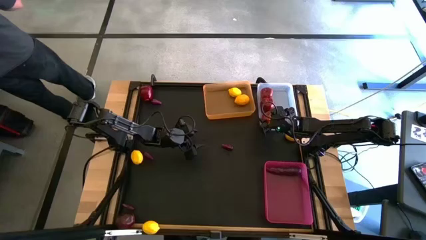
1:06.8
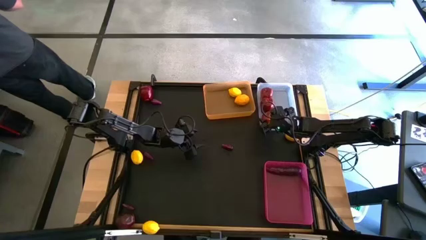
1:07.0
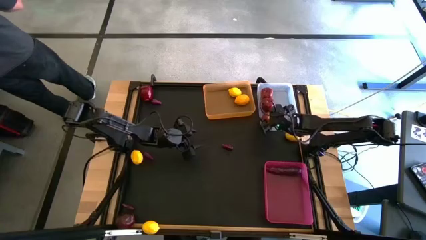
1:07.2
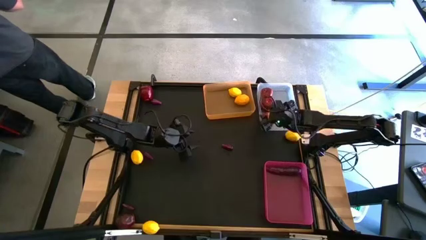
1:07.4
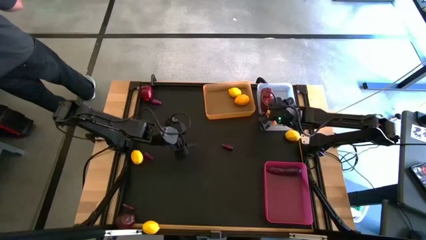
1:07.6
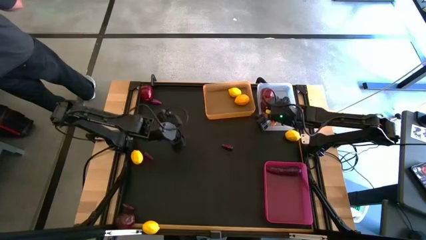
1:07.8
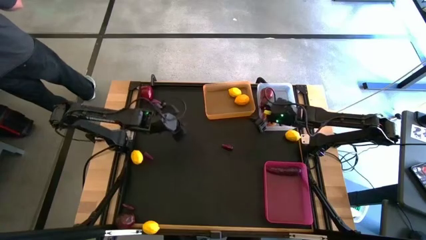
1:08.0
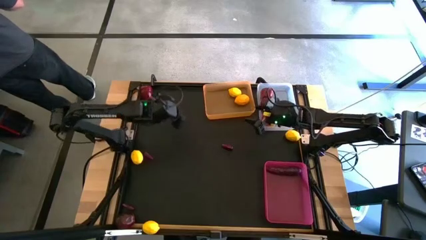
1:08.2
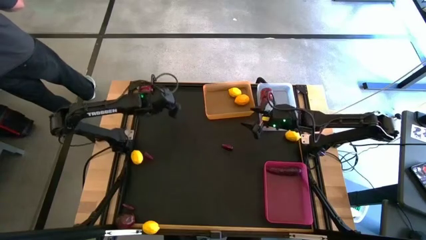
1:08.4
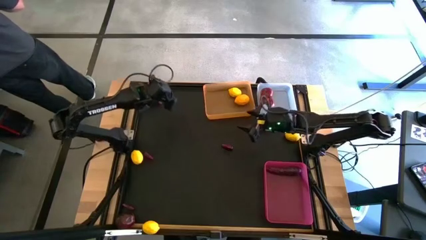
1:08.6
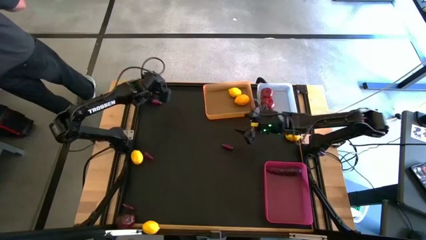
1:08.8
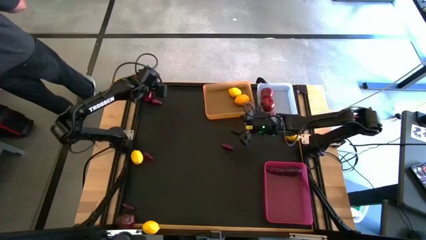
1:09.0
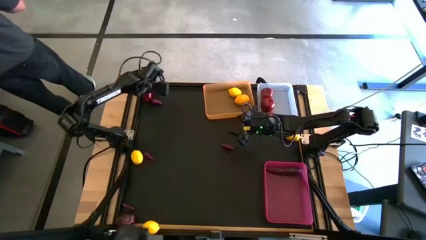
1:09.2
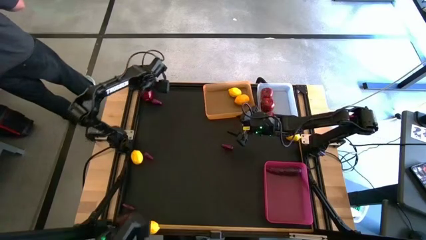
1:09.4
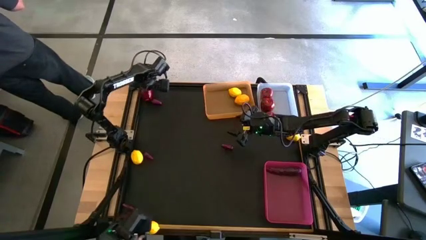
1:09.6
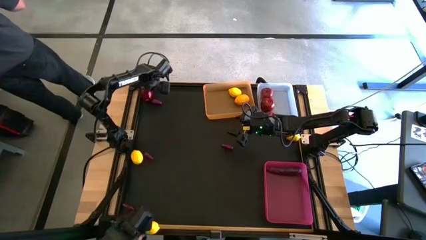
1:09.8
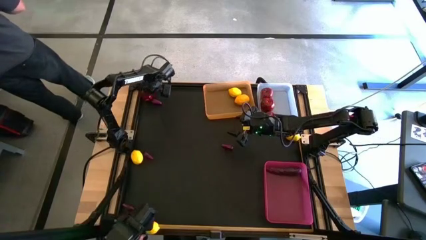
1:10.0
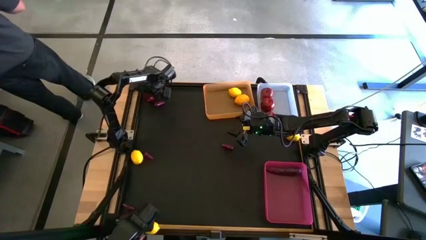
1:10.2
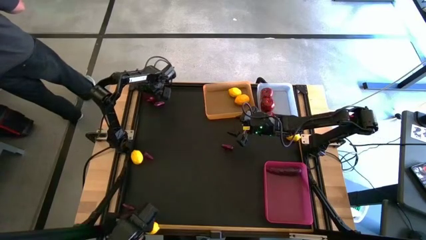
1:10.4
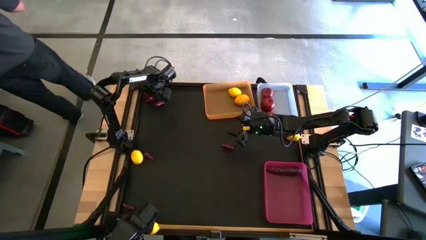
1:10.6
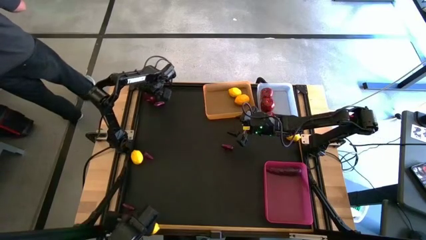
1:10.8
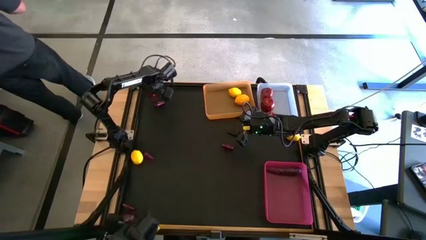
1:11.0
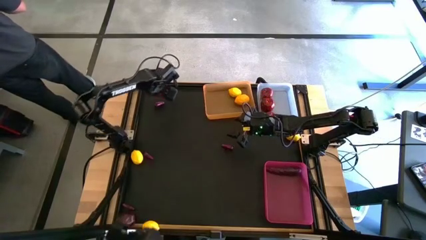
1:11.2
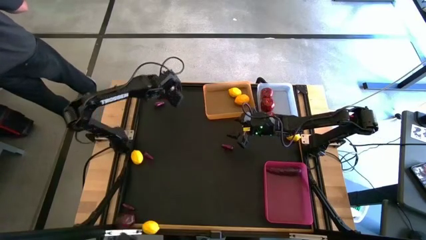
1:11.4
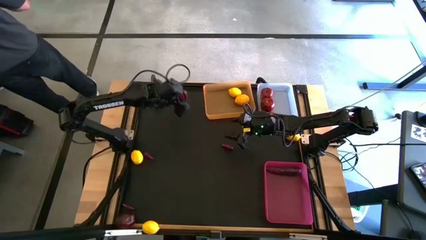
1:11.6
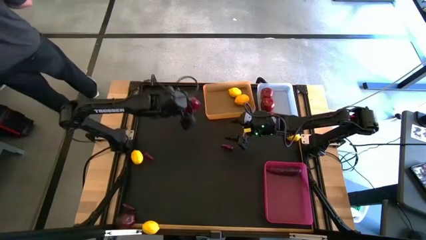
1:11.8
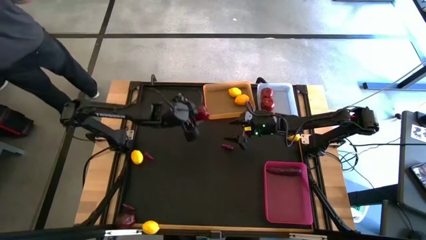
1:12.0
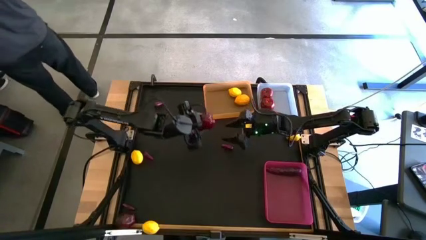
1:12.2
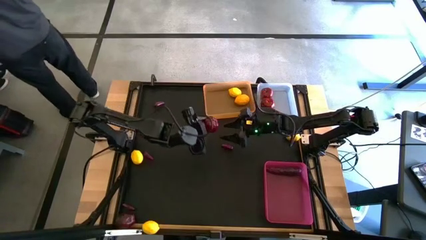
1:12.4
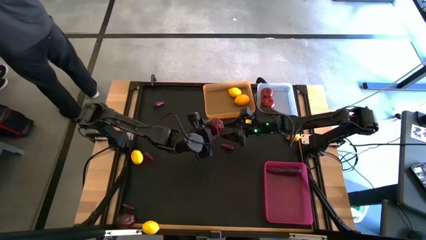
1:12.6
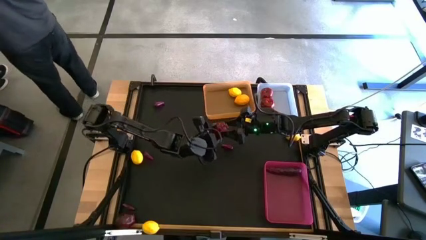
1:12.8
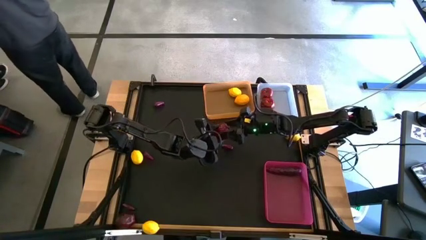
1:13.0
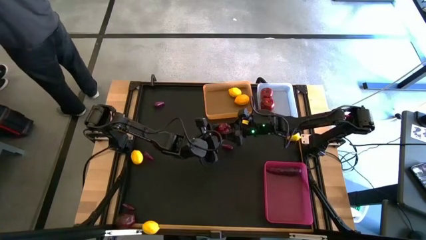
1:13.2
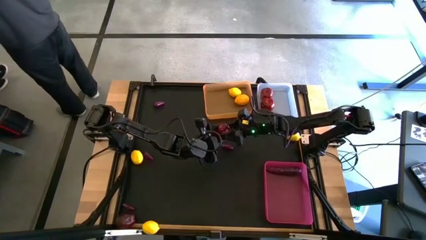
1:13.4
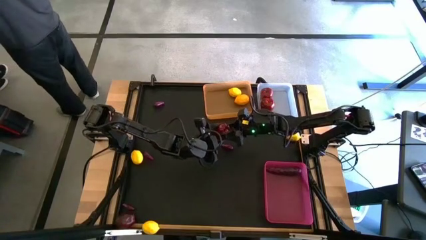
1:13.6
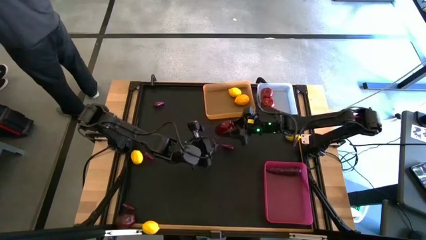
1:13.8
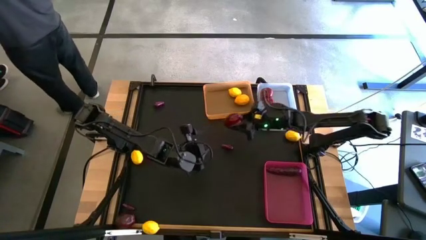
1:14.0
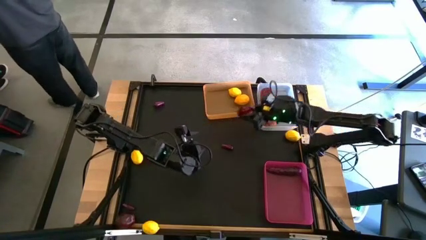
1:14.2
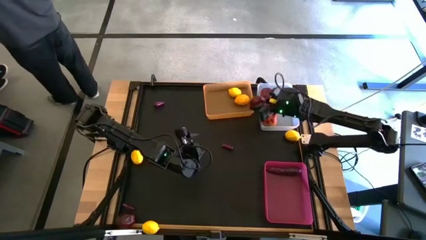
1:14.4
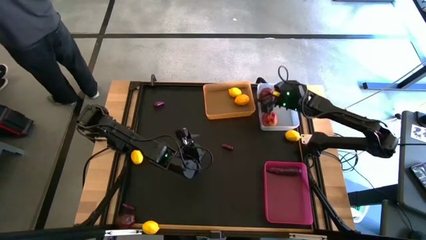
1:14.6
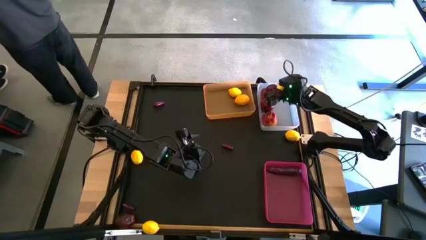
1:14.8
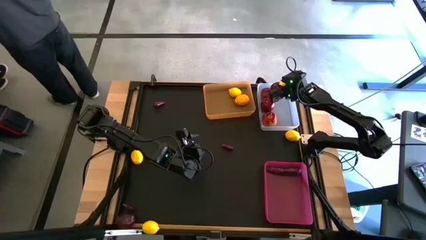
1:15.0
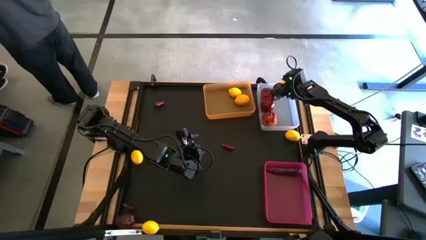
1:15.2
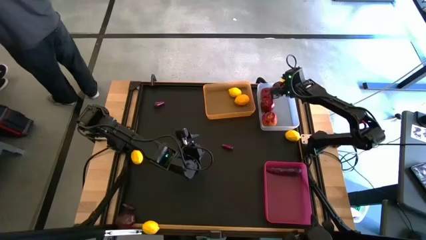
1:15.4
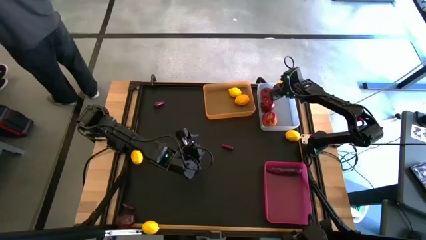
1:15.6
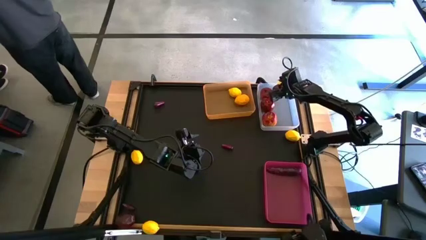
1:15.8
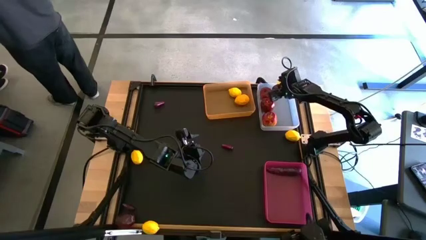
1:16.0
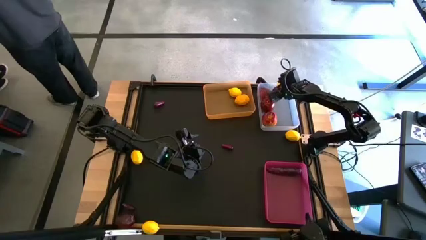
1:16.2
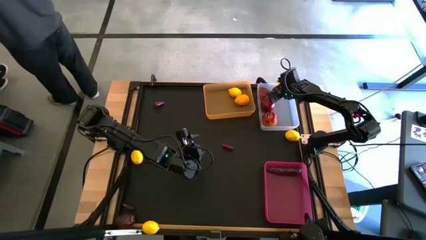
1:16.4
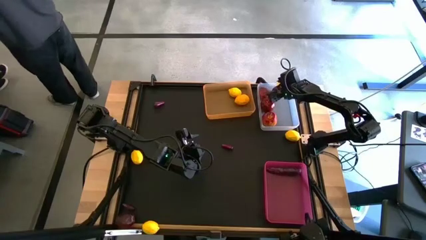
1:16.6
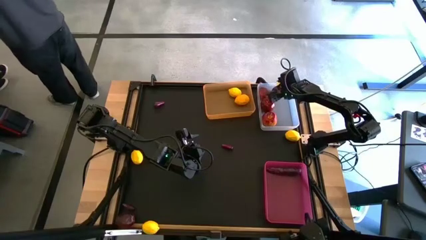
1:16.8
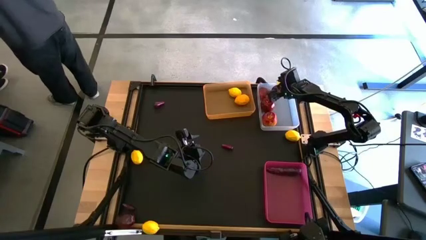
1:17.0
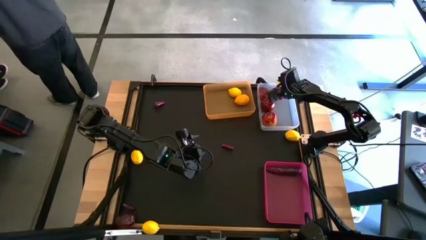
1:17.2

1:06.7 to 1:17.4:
Task: Sort produce into baskets
Put the red apple into the white bin

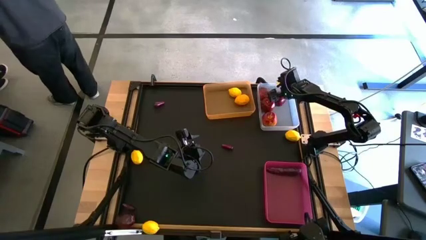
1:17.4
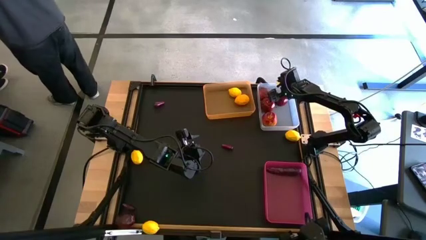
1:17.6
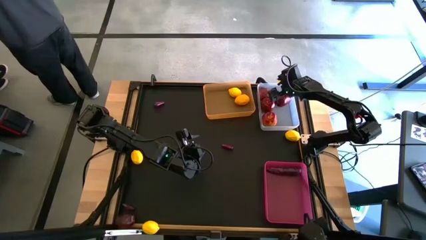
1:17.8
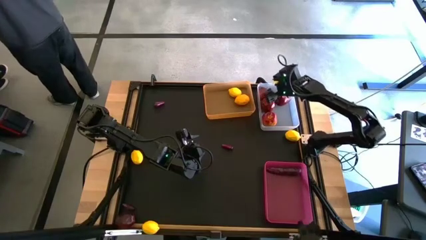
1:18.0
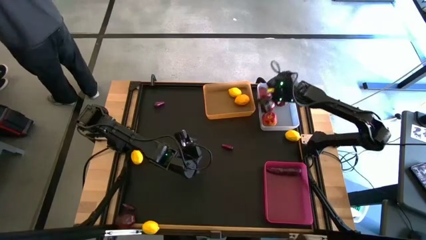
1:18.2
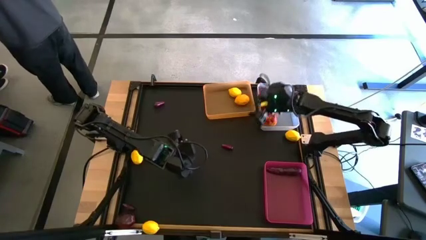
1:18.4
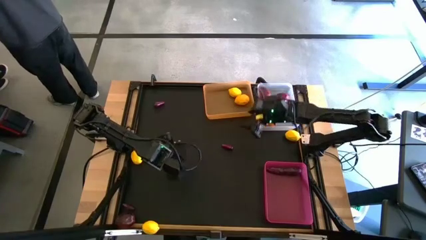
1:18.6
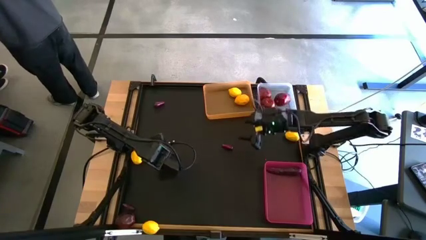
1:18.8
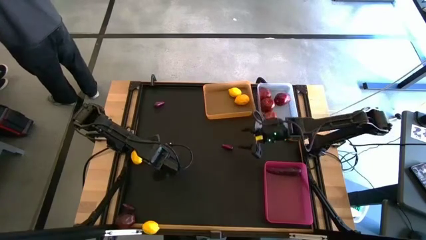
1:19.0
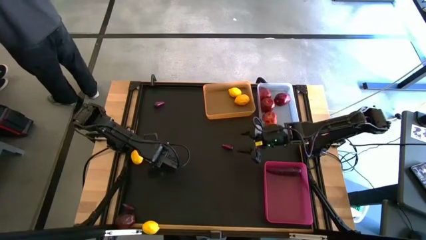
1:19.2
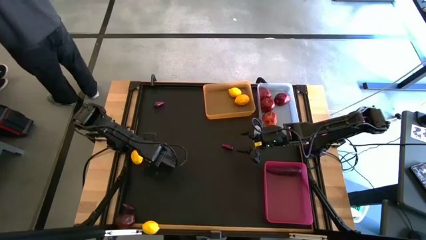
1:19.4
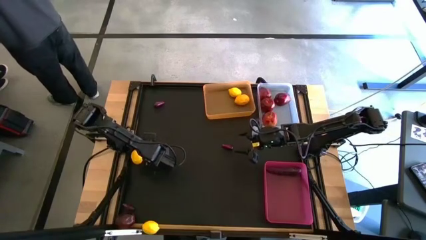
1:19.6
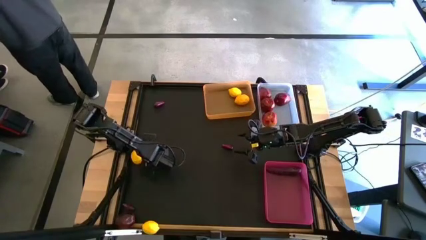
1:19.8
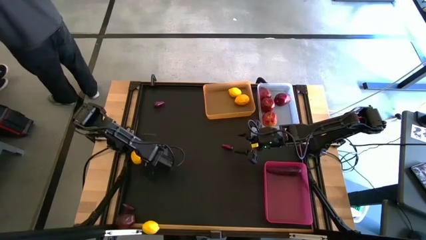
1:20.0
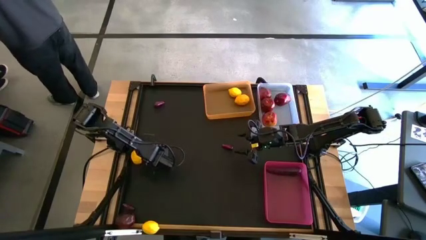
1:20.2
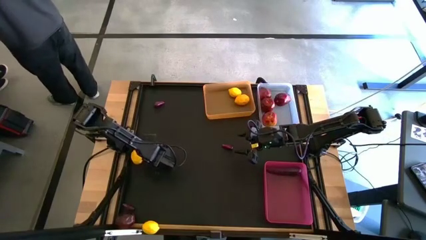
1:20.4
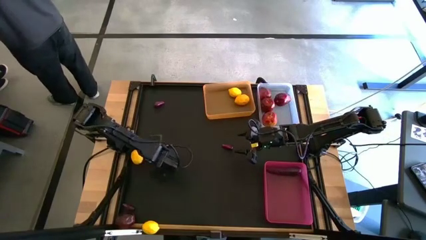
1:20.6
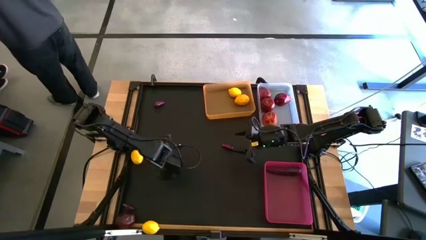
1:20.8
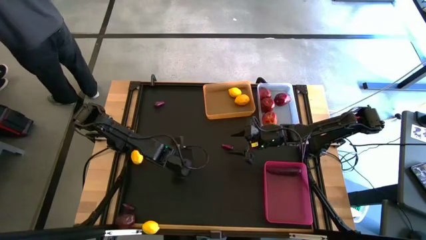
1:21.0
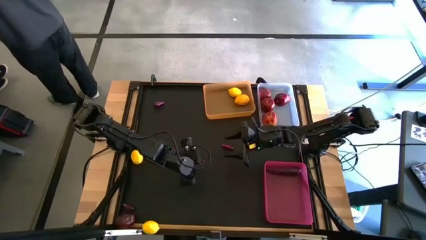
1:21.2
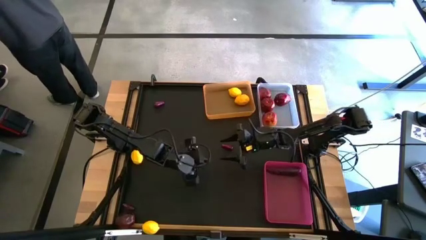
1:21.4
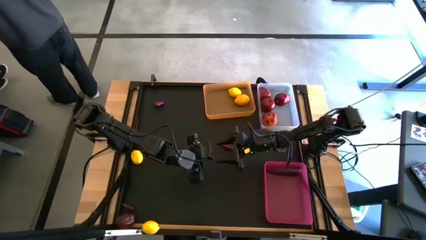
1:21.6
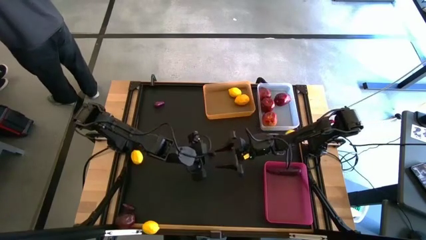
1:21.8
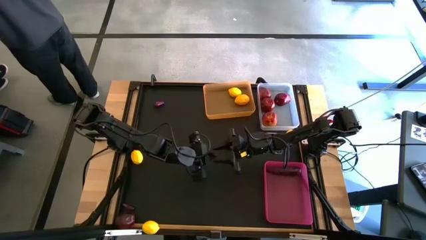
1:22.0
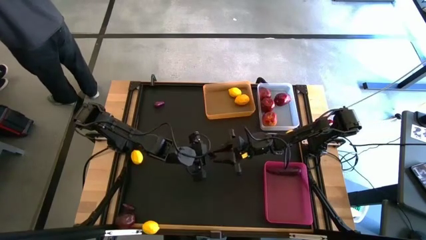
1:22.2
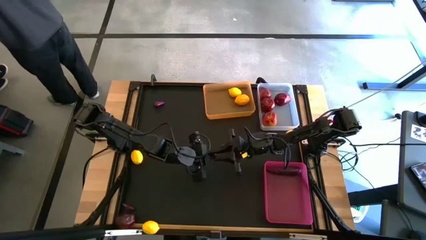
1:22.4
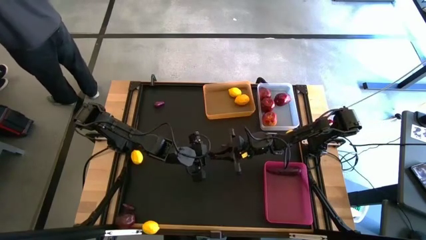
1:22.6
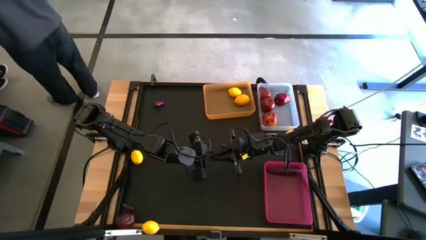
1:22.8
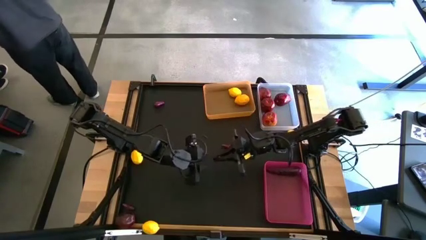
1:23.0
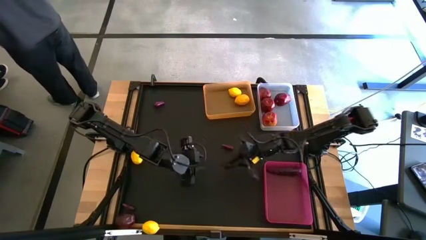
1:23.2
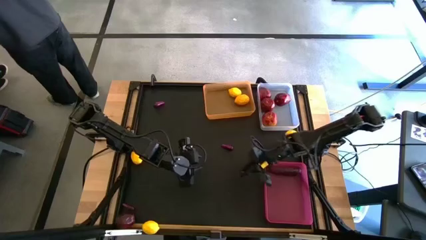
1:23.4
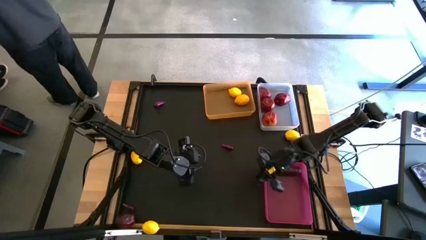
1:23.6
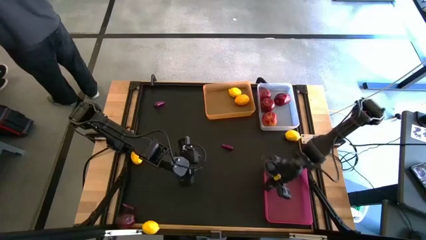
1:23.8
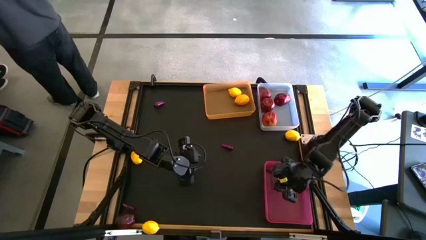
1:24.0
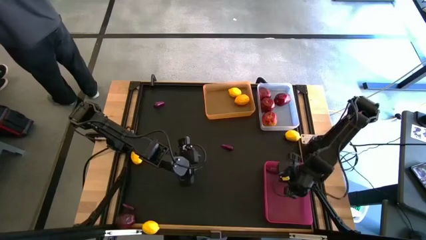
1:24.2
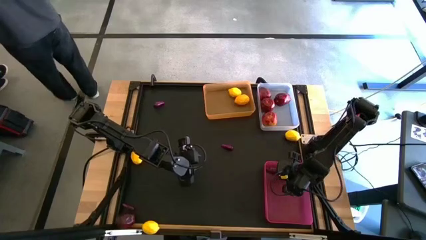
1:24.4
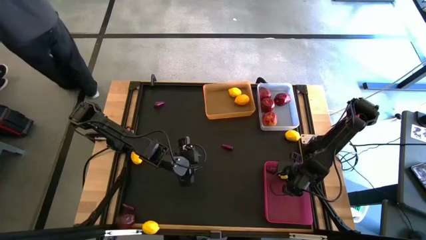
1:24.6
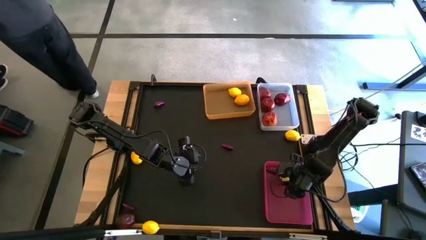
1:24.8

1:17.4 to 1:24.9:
Put the violet eggplant into the pink bin
